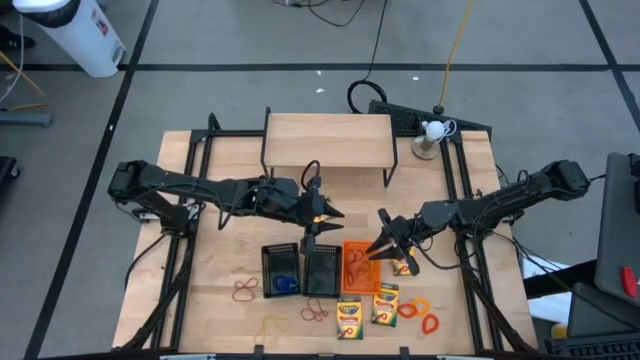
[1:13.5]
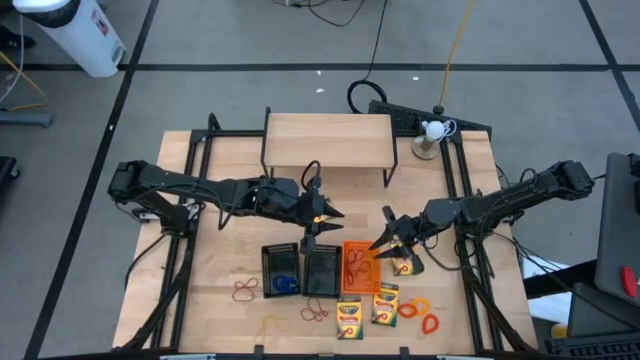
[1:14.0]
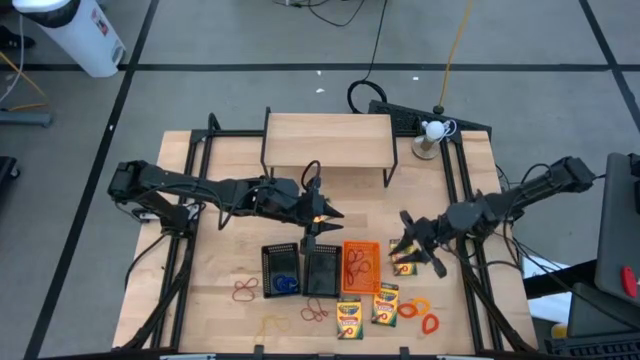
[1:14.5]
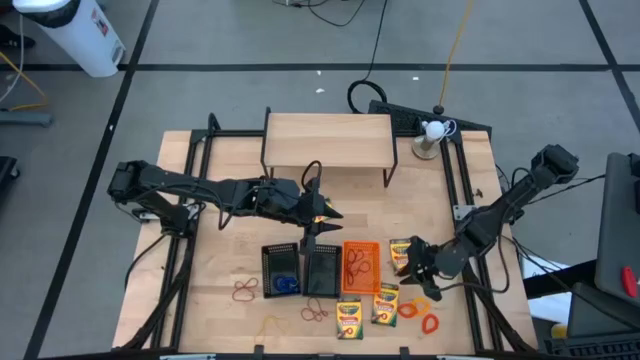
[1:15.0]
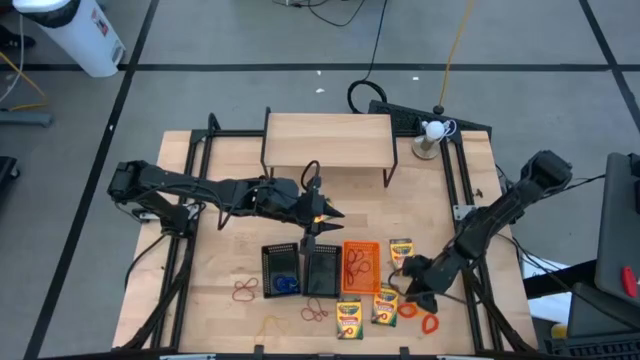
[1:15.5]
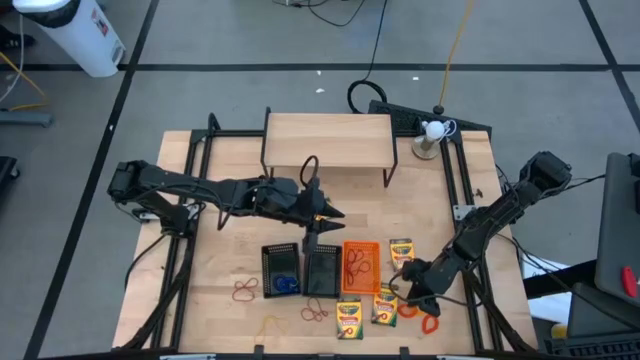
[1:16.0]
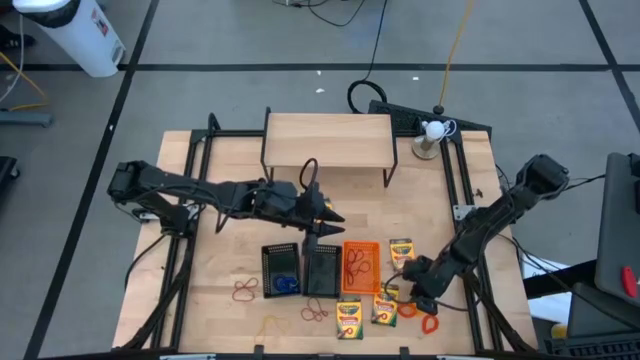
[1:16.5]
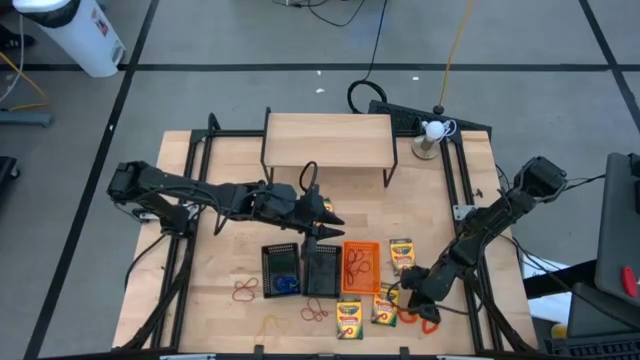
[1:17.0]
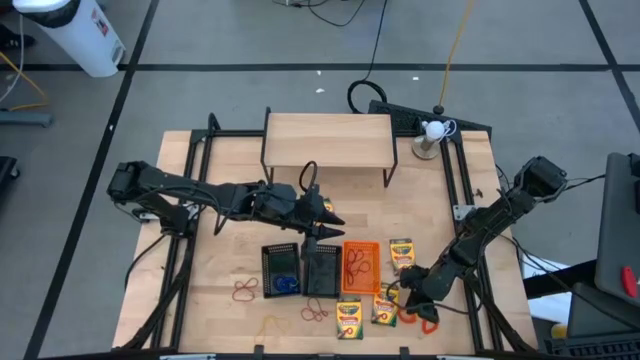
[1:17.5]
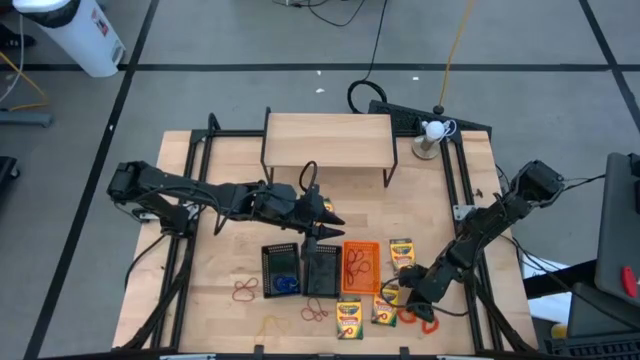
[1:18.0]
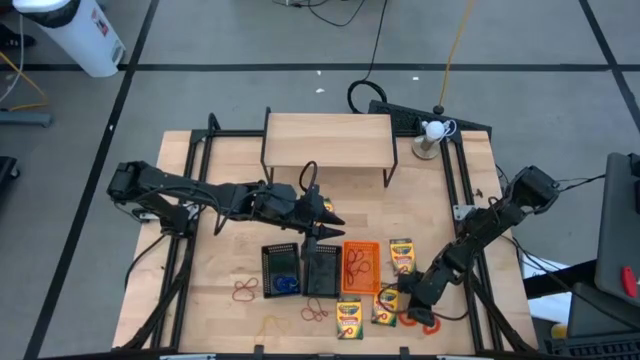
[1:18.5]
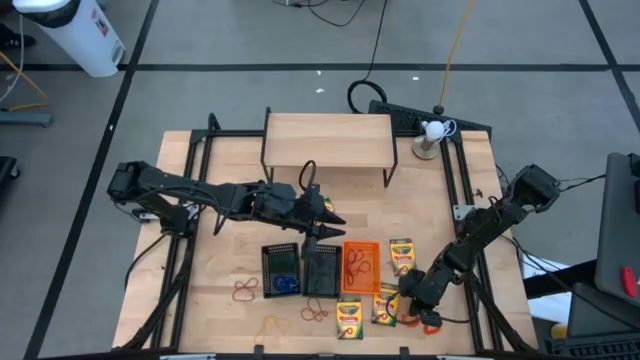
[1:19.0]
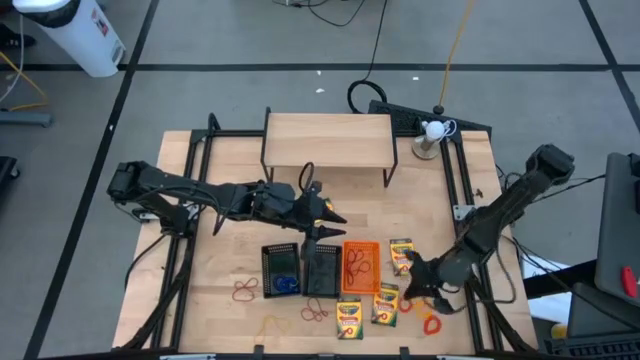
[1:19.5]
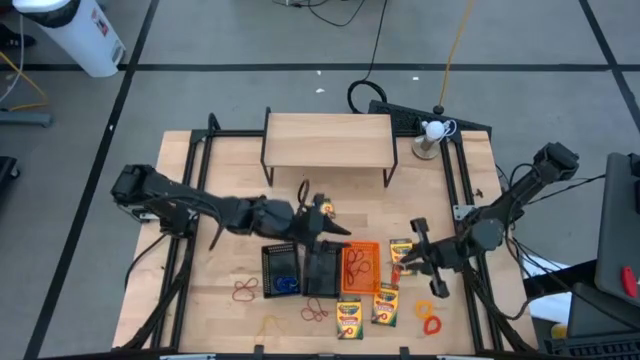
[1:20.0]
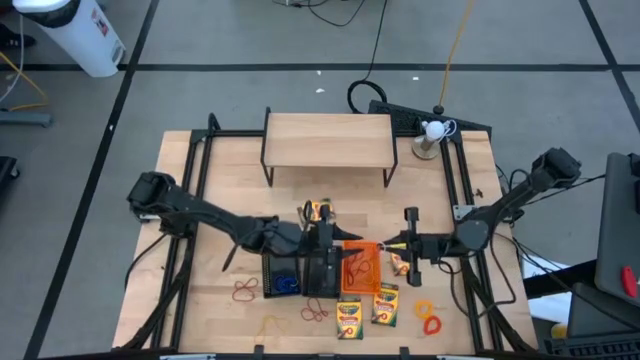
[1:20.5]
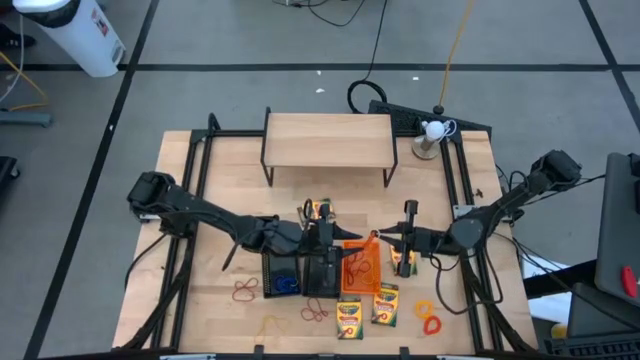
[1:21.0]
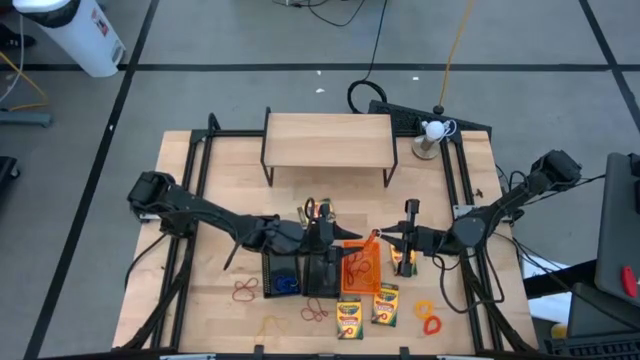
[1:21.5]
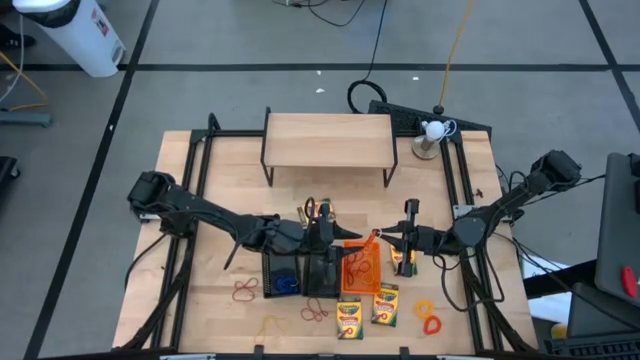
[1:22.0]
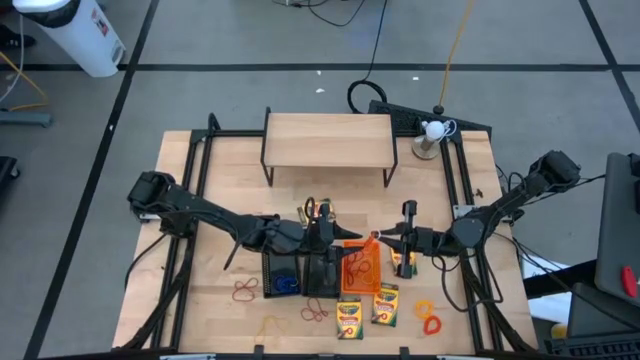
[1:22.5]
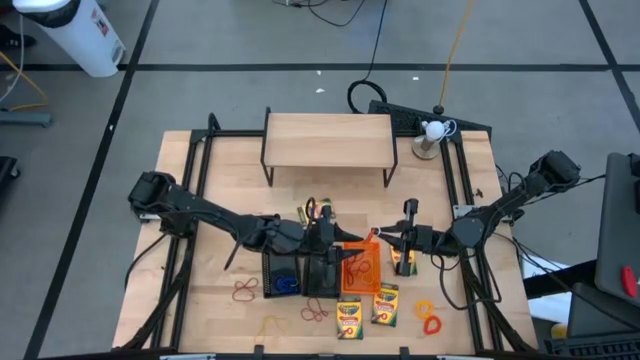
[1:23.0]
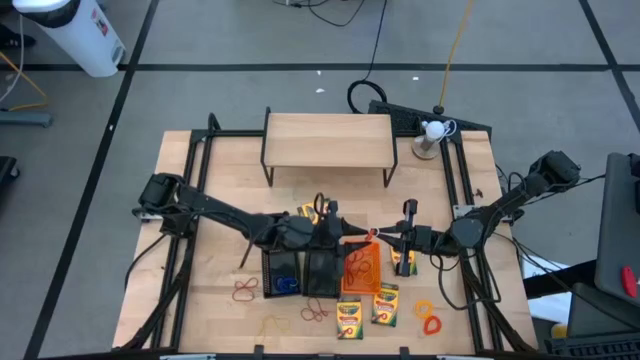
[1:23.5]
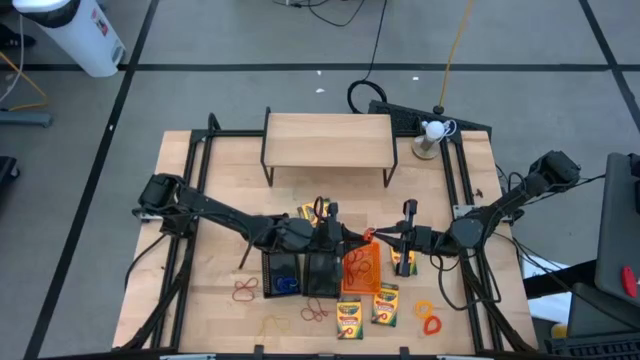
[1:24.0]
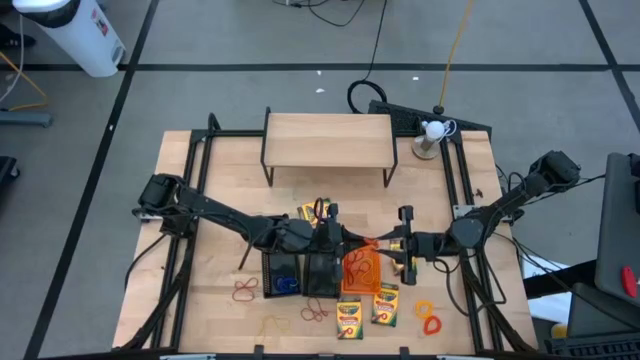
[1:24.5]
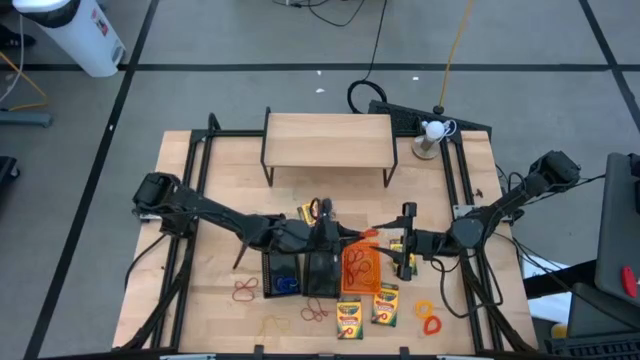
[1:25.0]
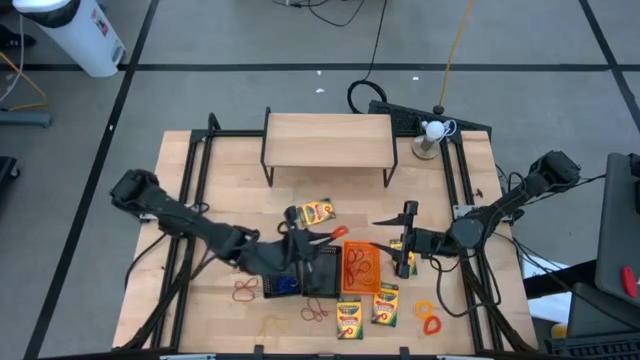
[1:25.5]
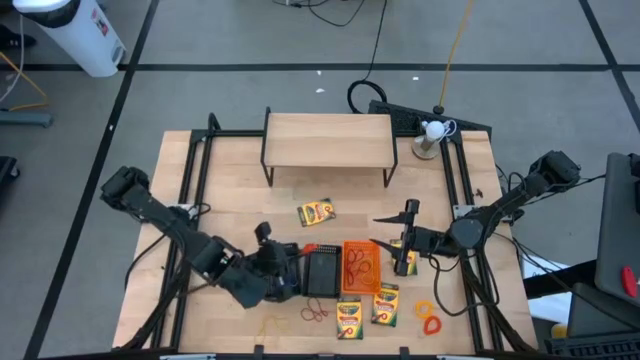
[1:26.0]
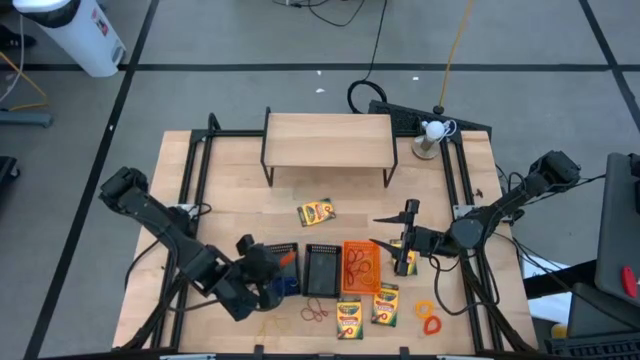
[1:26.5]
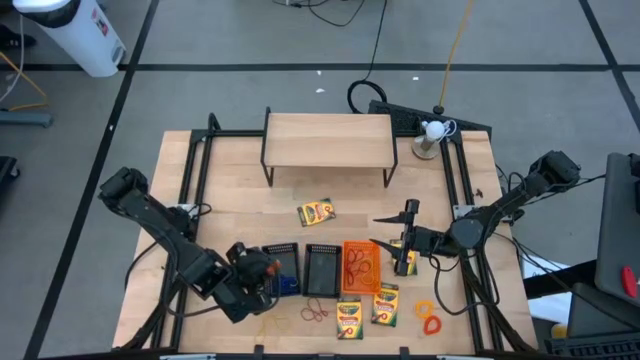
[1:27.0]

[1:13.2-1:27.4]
Task: Pick & Place Office Desk Supplies
Put the orange spring keychain into the left black bin

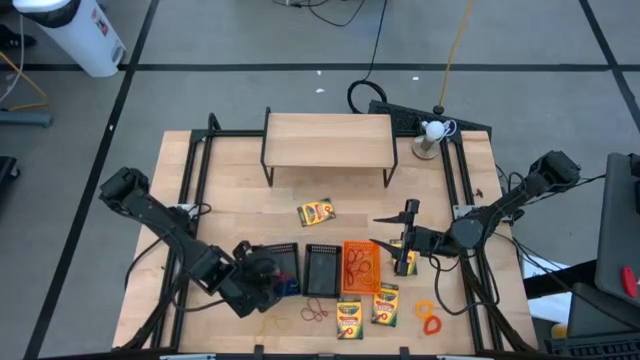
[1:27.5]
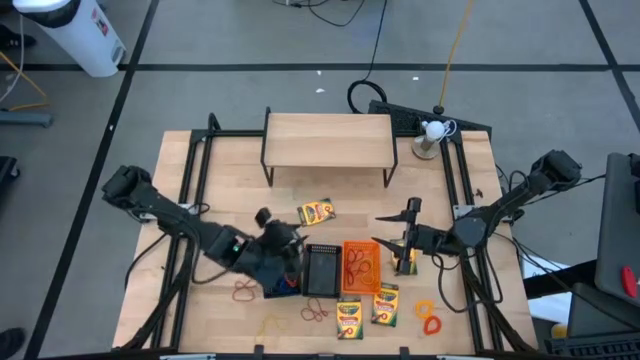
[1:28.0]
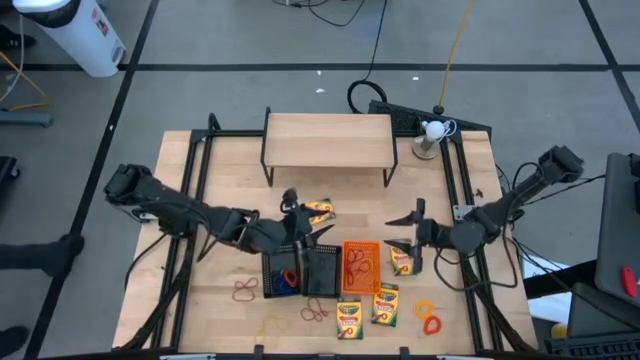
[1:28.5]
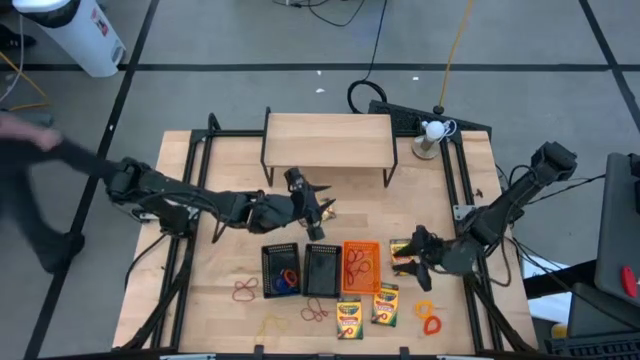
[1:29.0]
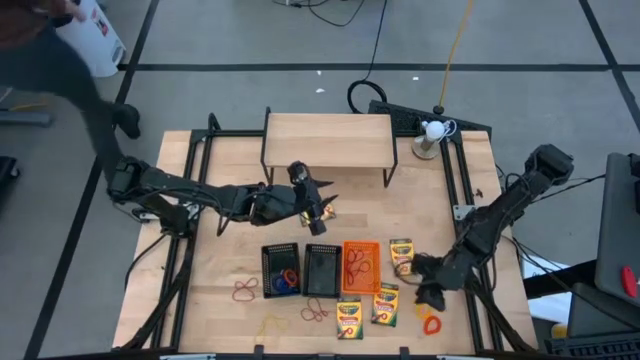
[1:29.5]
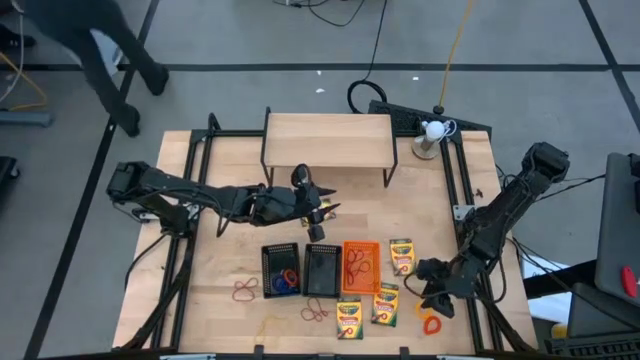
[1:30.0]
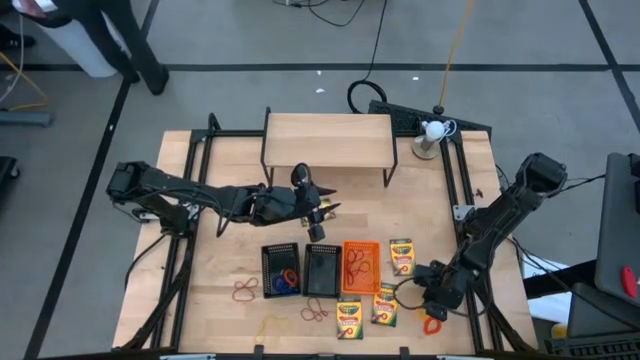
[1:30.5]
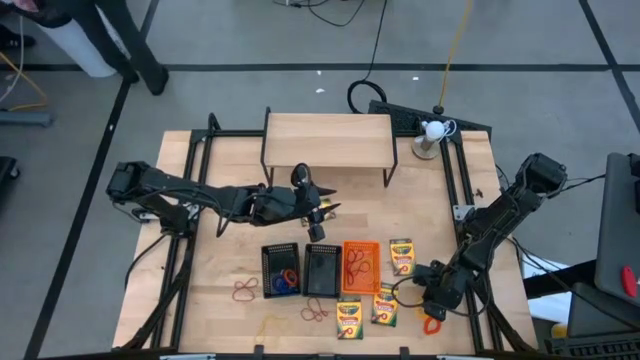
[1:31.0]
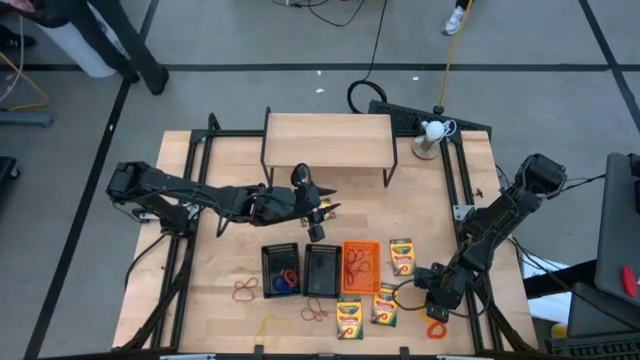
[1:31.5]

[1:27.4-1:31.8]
Put the yellow spring keychain into the left black bin

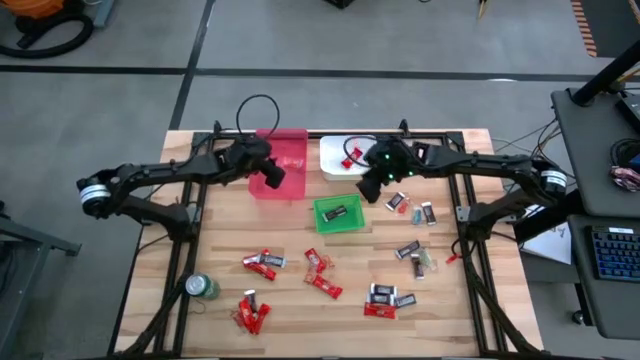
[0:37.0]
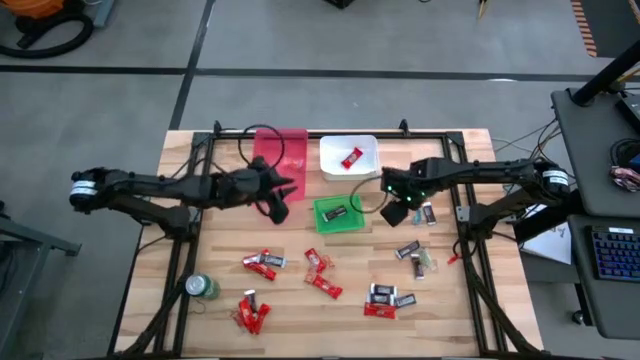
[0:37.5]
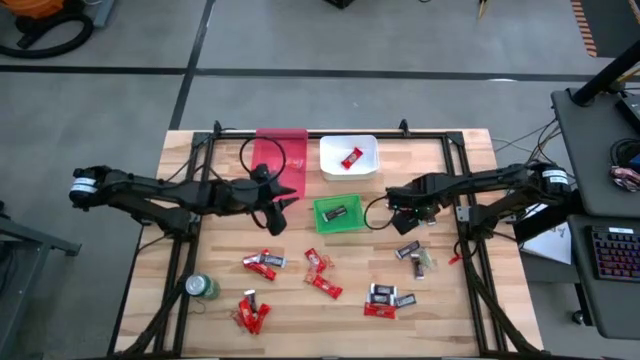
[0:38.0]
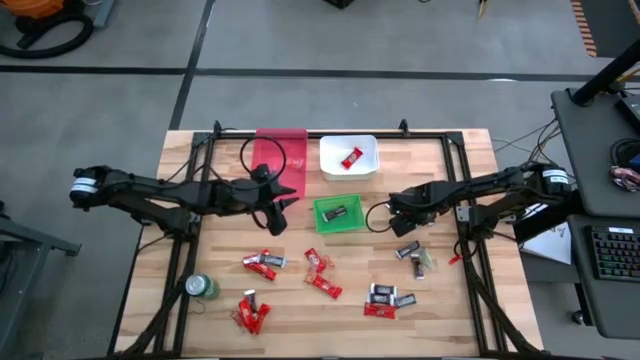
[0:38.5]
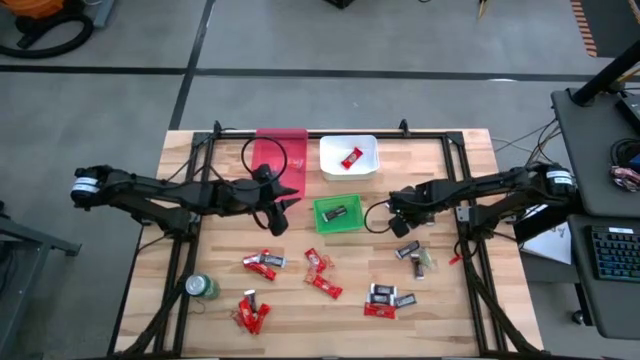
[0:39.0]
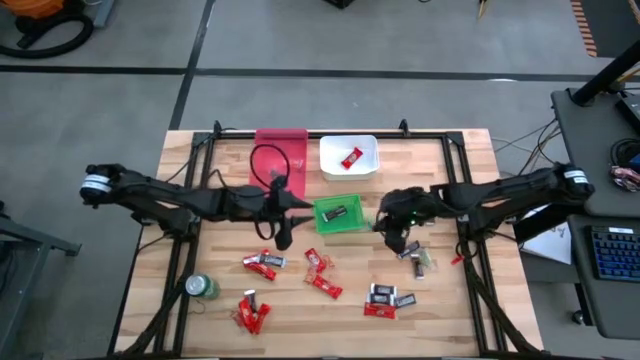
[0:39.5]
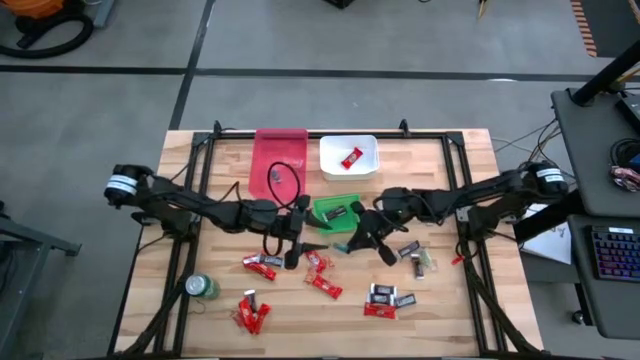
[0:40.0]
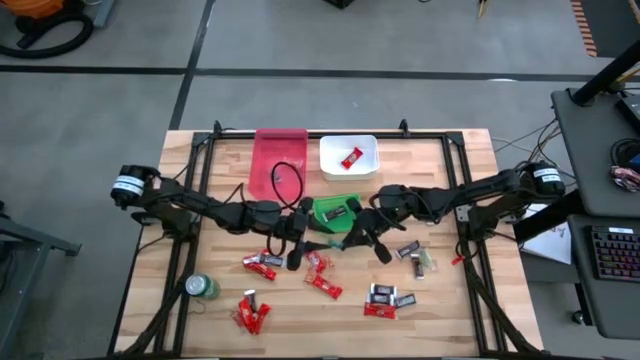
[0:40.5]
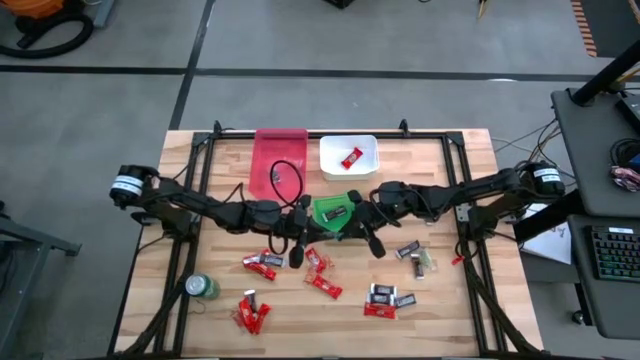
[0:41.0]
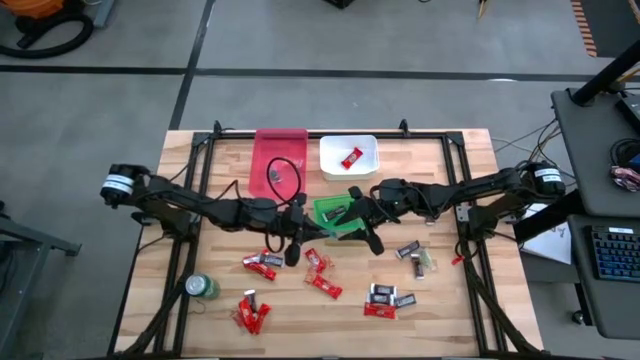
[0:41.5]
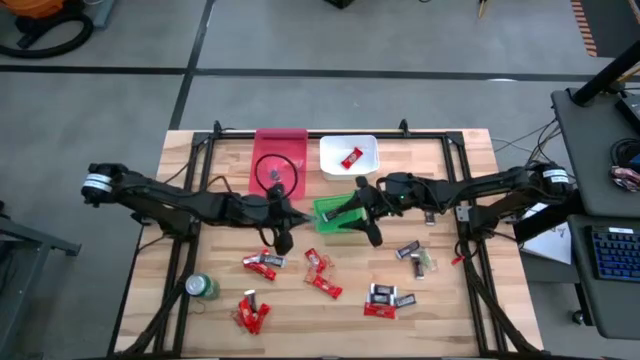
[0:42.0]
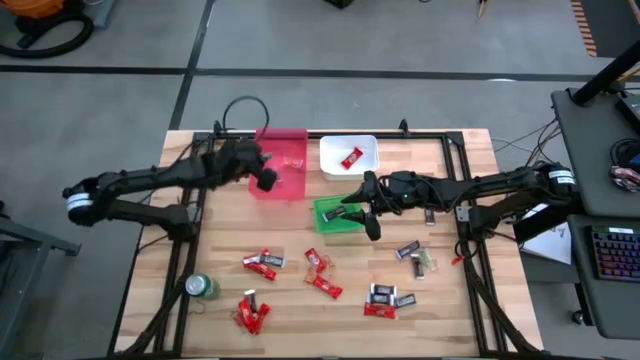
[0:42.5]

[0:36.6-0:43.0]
Task: Sort candy
Put the blue candy into the red bin
